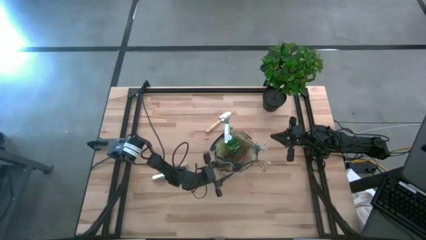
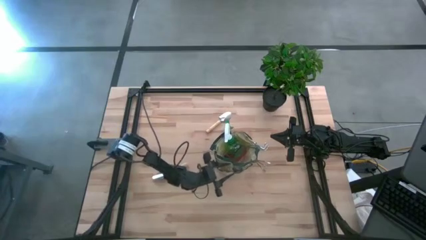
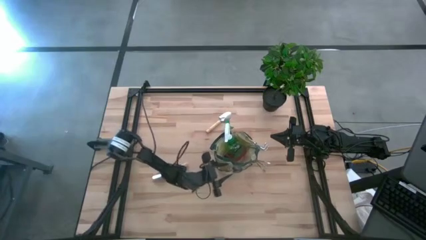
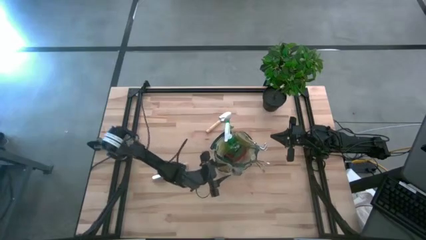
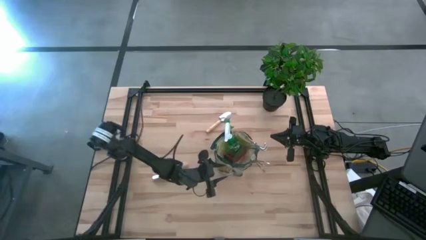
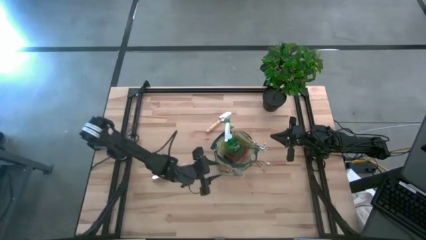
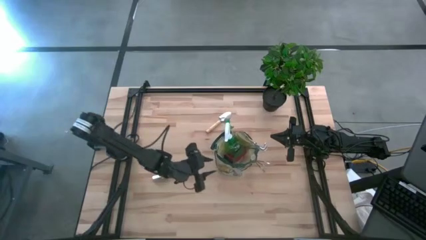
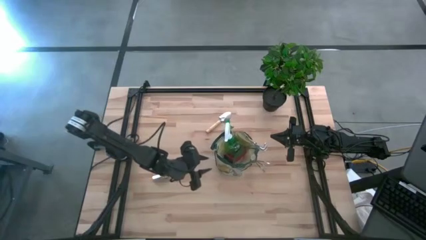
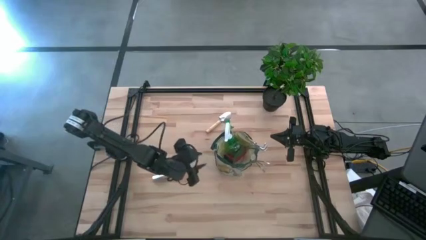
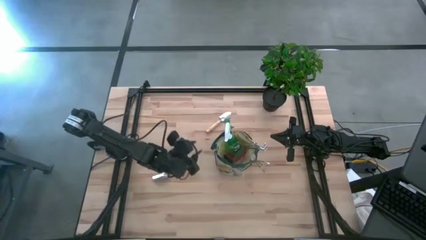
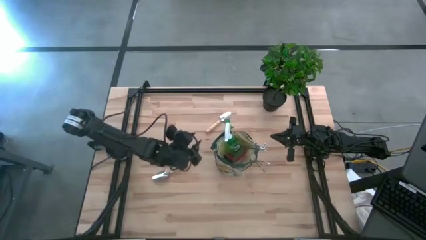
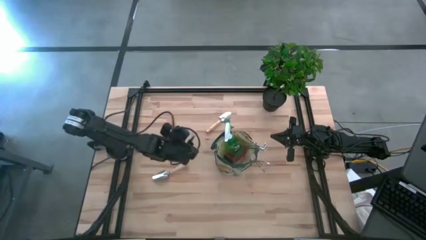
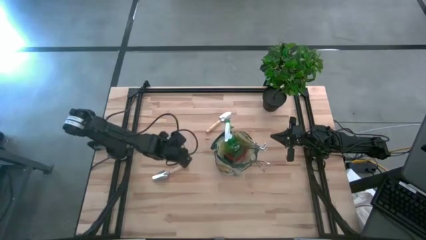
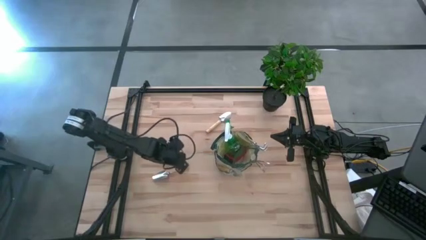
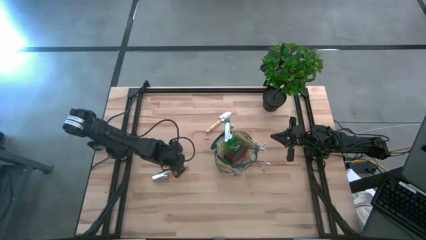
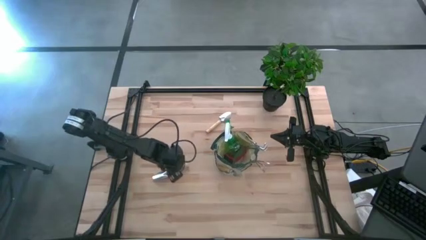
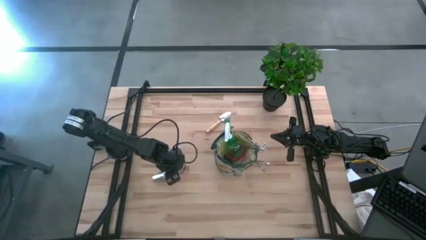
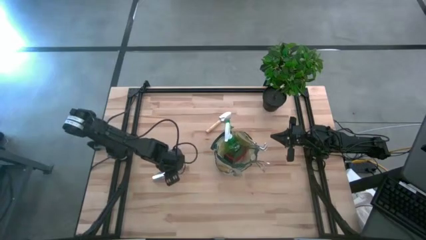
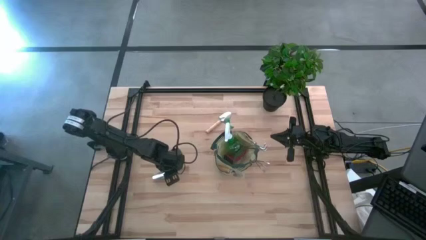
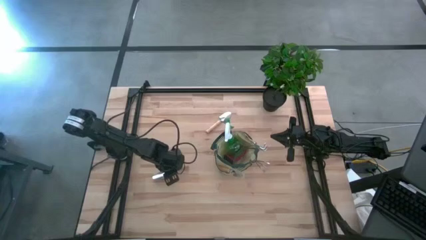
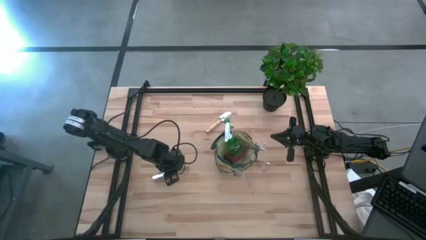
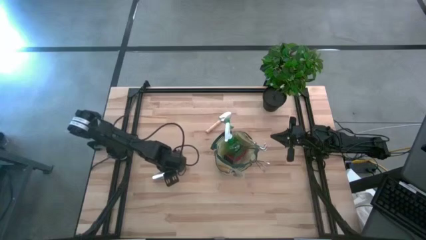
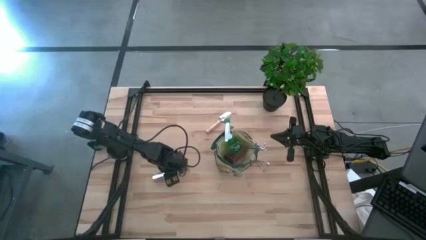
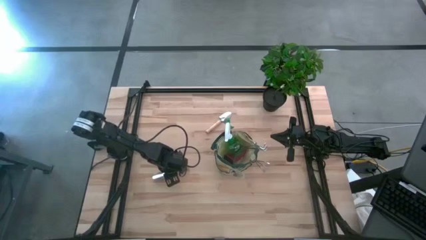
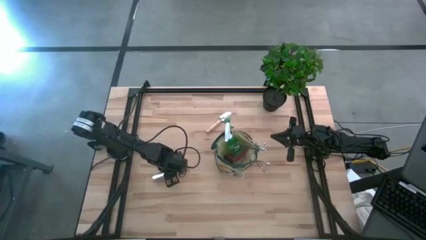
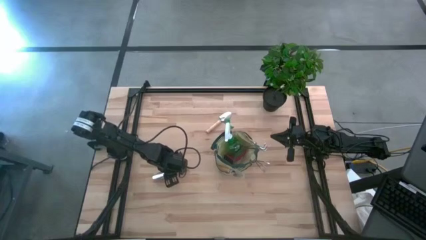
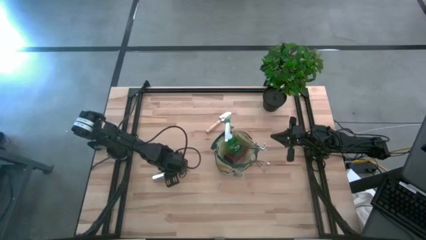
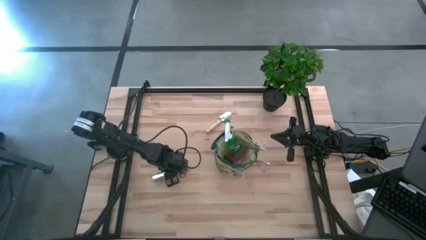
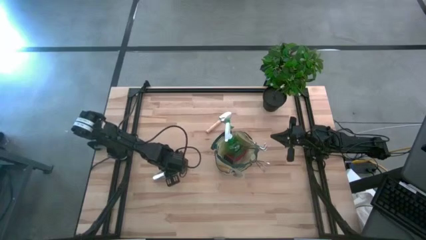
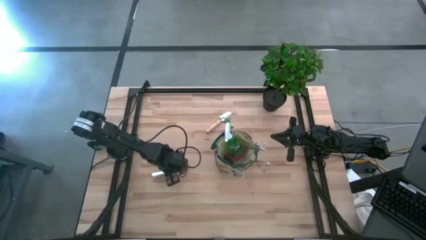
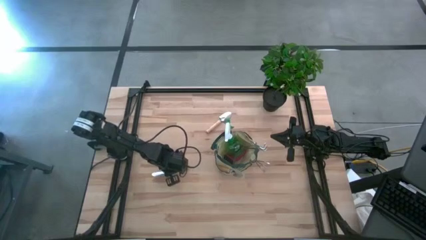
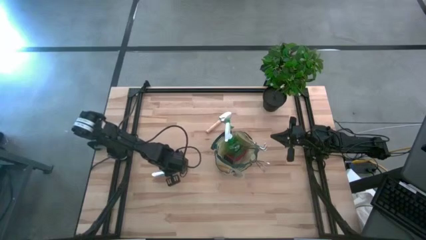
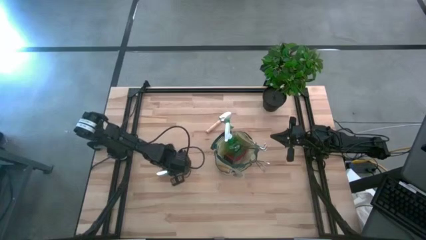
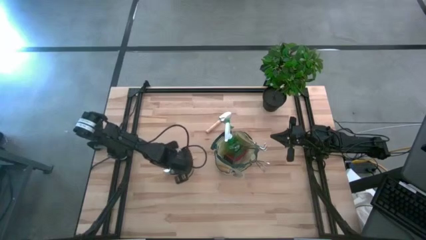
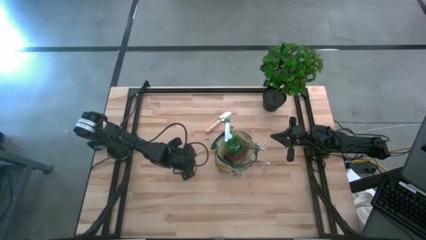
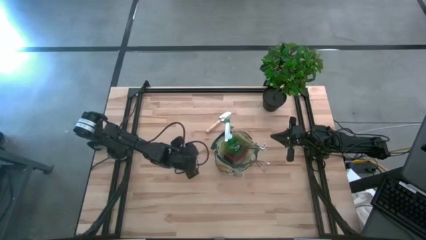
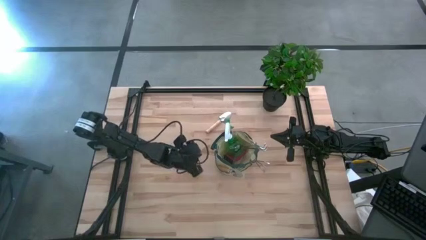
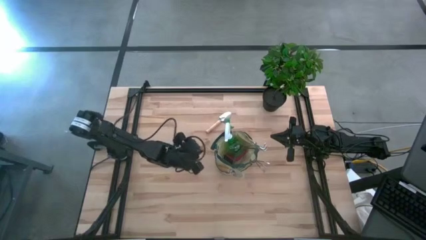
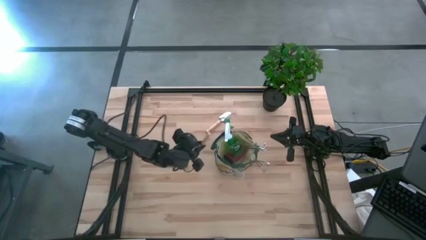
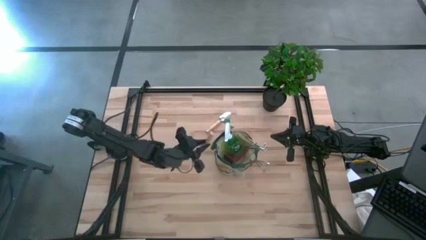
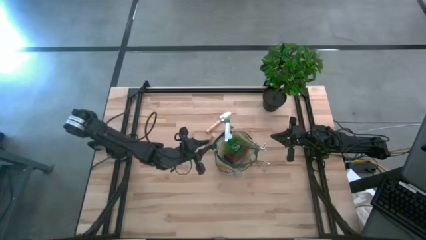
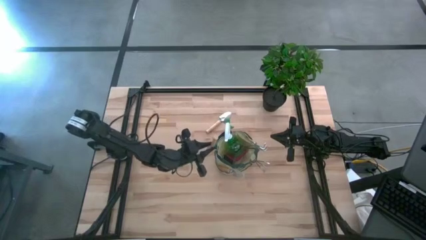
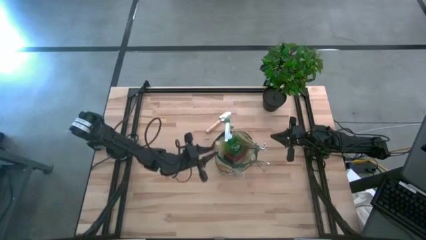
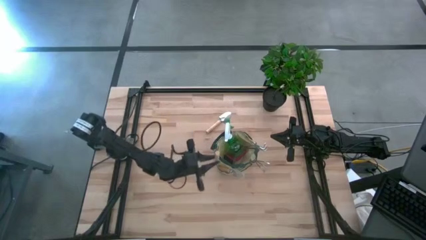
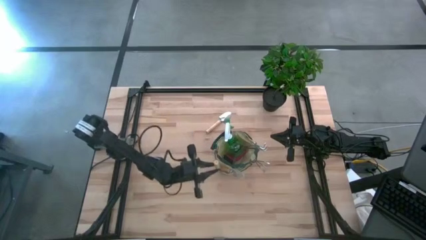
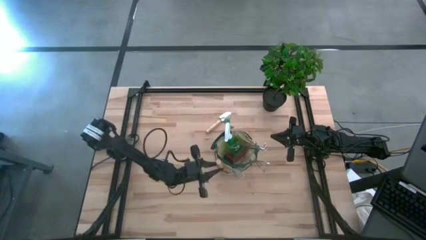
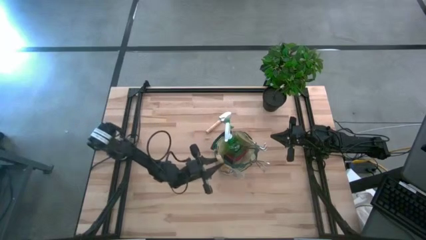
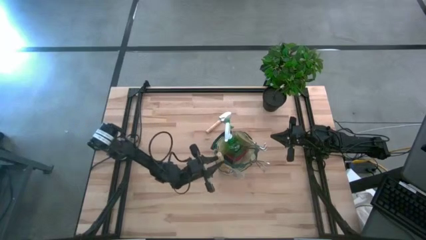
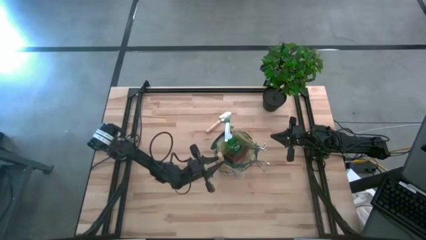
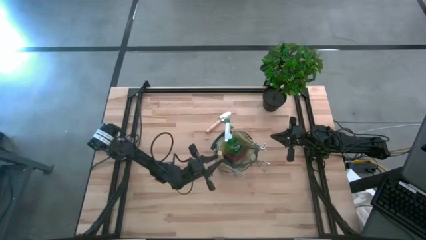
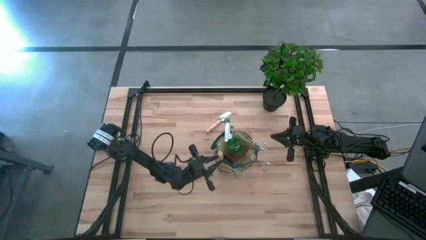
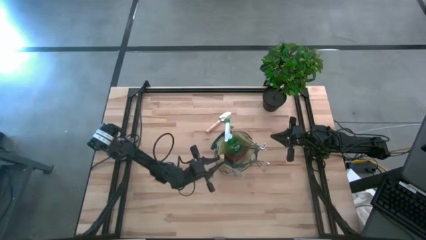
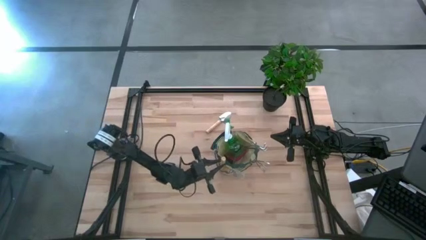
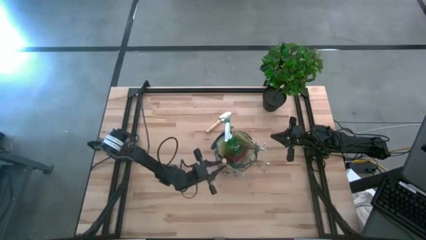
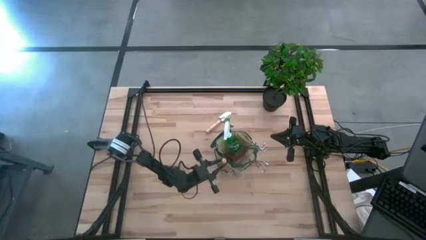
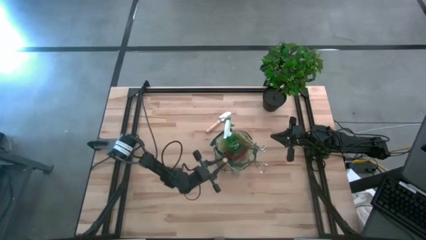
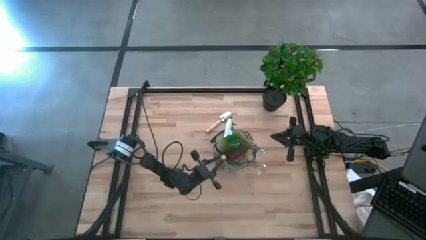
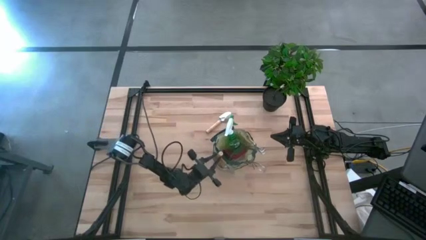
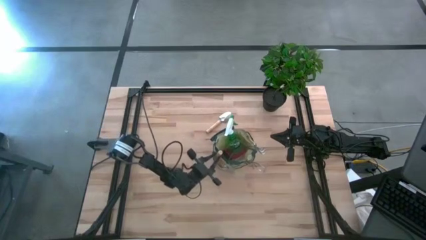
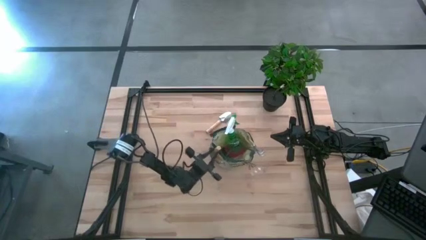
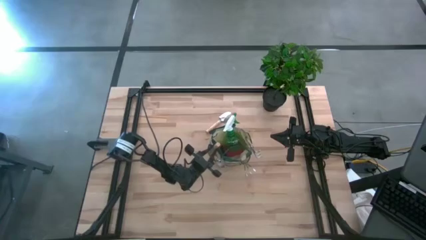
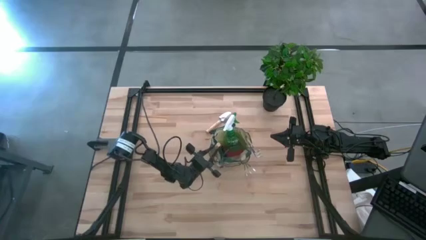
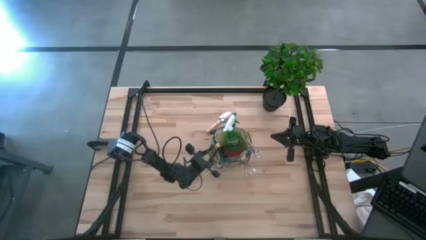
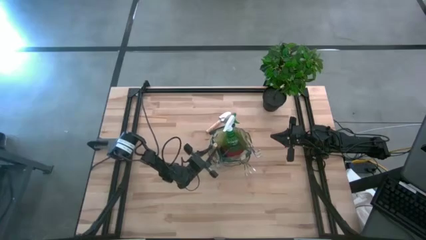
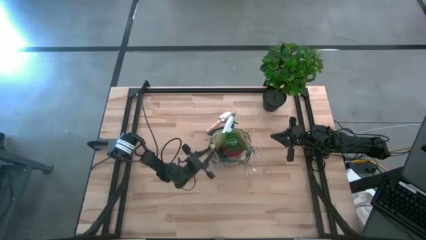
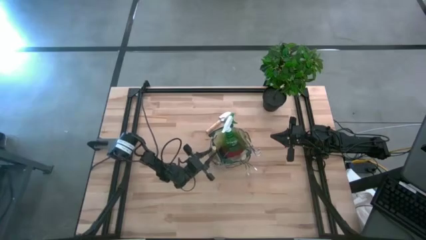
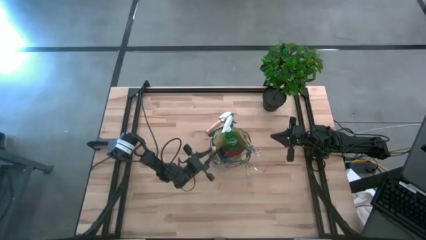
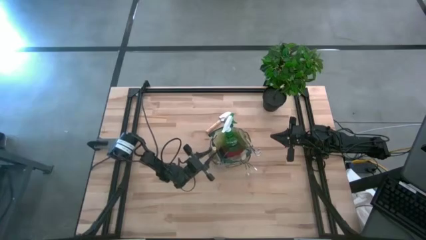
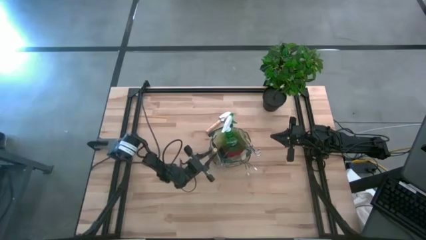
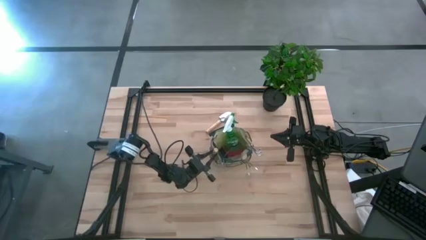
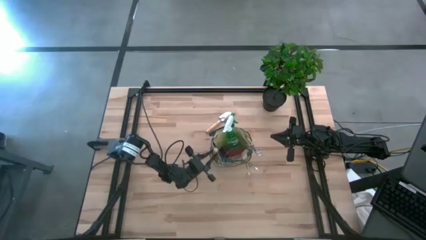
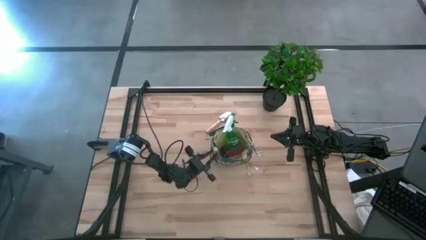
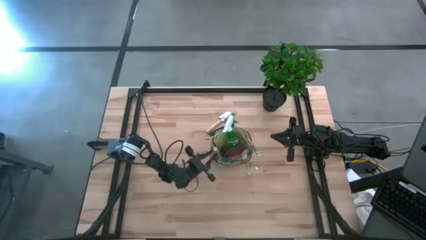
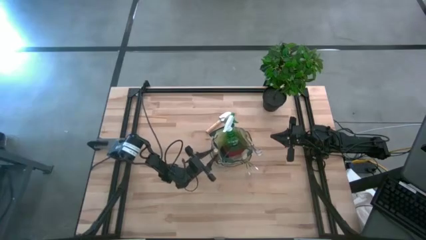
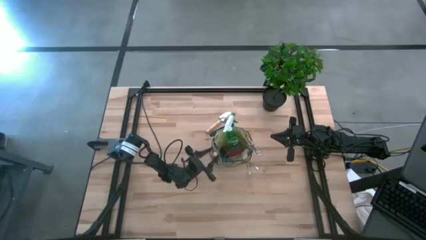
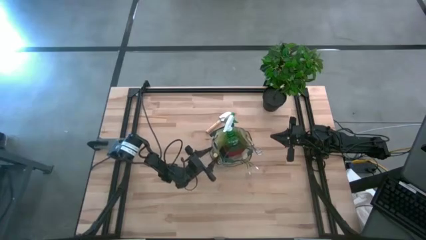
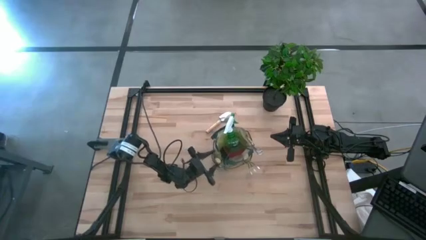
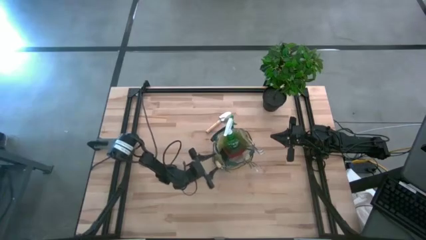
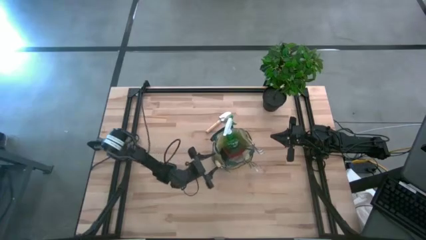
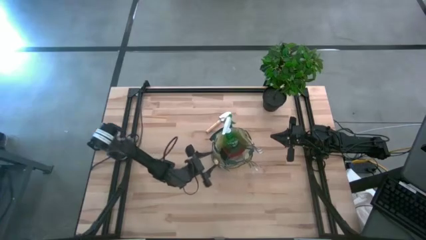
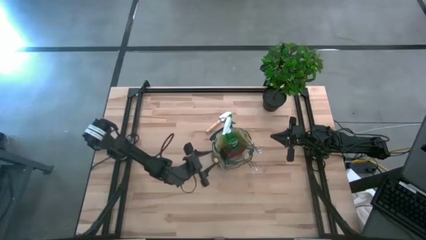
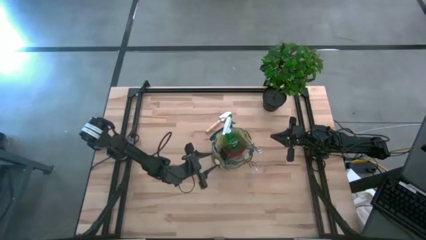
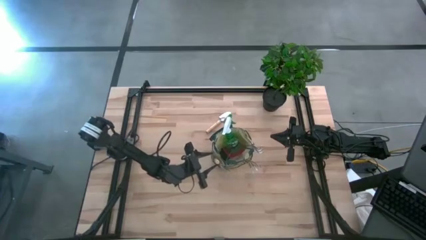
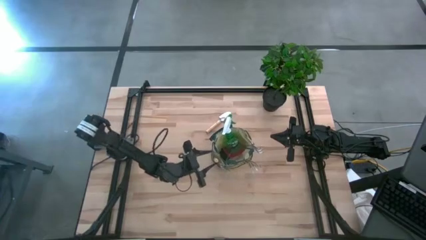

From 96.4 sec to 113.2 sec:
Task: Pick & Place Garden tools in Gardening bag
Put the bottom brown trowel into the green gardening bag
